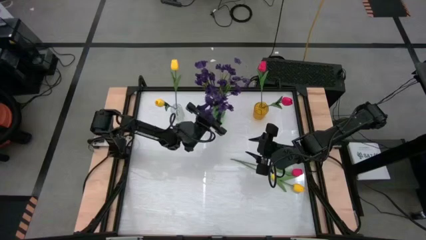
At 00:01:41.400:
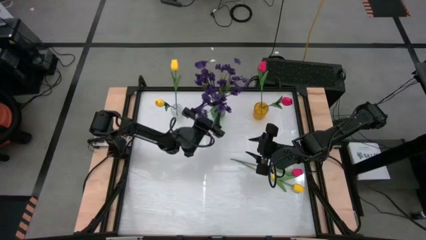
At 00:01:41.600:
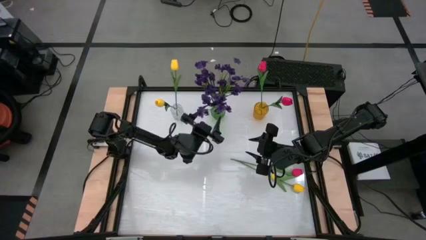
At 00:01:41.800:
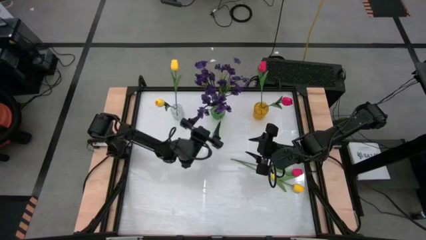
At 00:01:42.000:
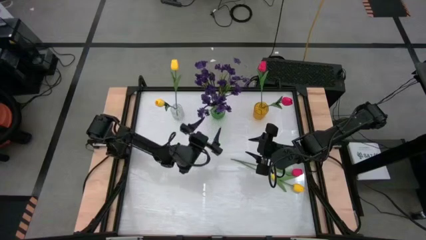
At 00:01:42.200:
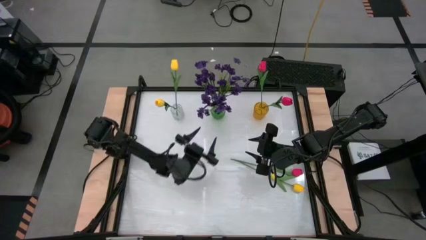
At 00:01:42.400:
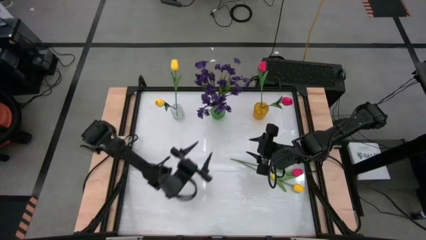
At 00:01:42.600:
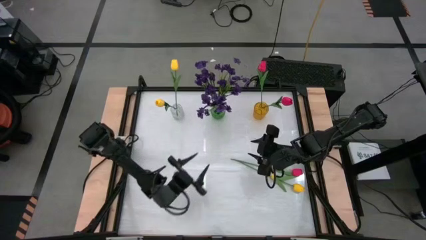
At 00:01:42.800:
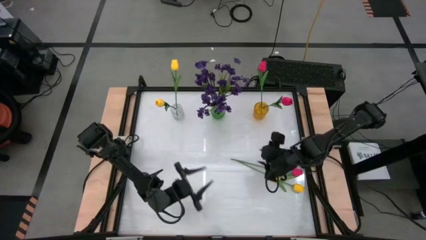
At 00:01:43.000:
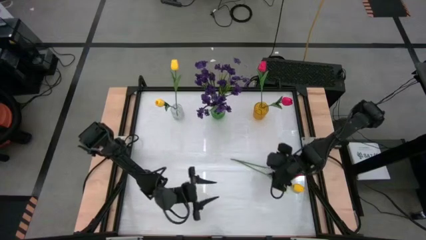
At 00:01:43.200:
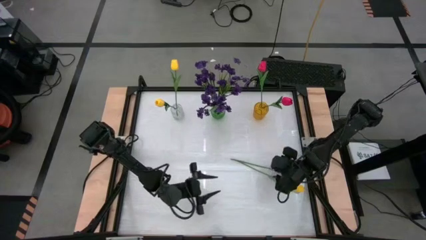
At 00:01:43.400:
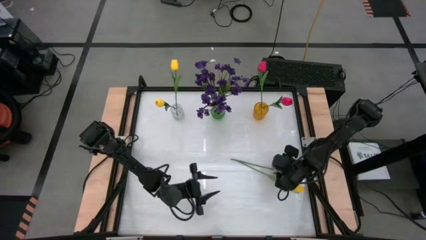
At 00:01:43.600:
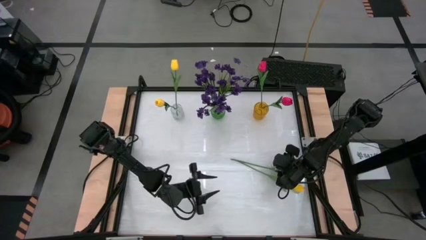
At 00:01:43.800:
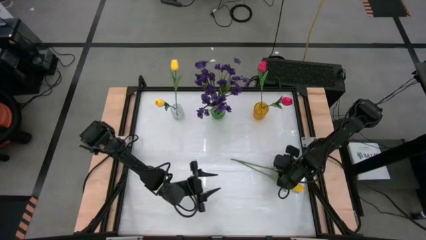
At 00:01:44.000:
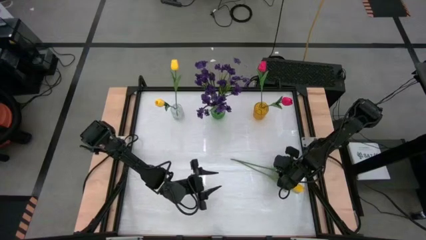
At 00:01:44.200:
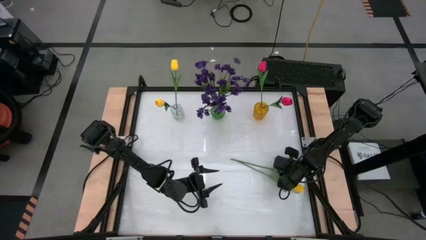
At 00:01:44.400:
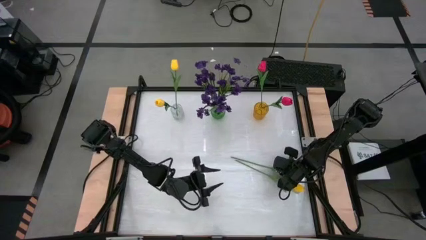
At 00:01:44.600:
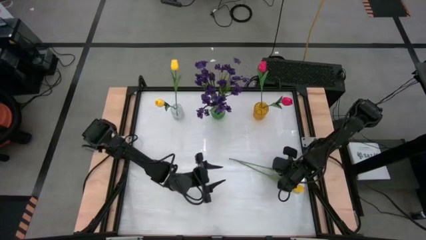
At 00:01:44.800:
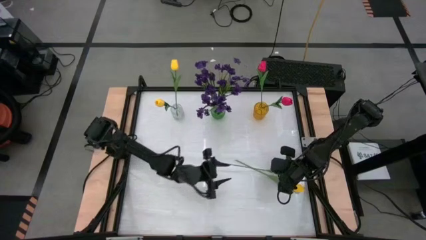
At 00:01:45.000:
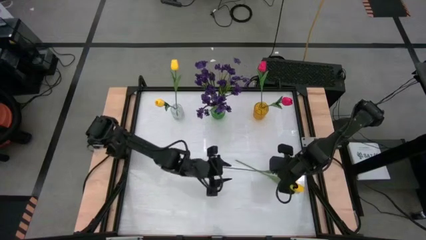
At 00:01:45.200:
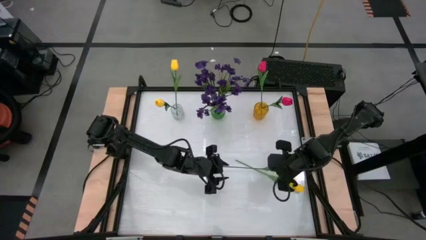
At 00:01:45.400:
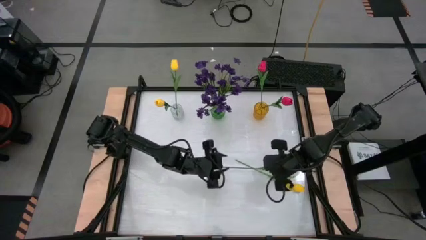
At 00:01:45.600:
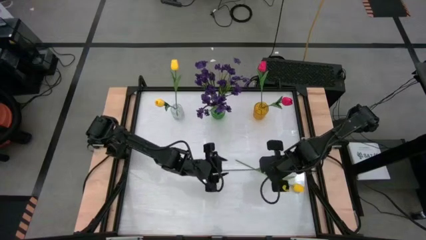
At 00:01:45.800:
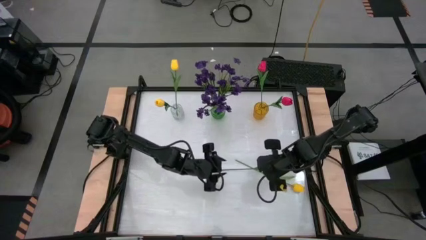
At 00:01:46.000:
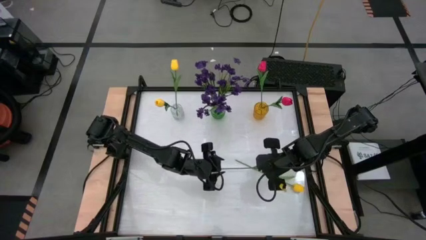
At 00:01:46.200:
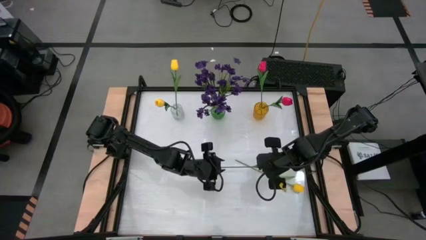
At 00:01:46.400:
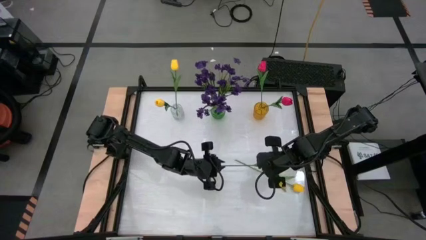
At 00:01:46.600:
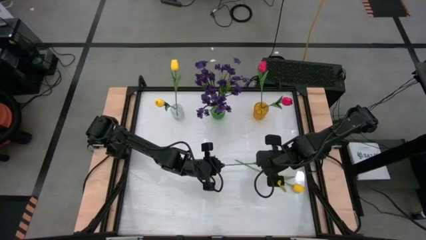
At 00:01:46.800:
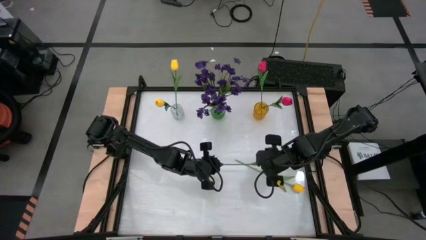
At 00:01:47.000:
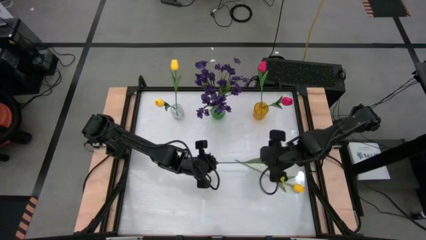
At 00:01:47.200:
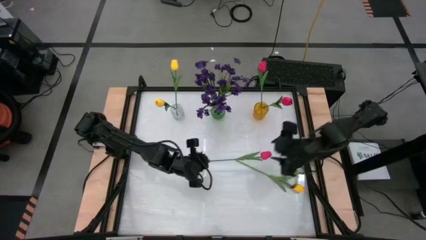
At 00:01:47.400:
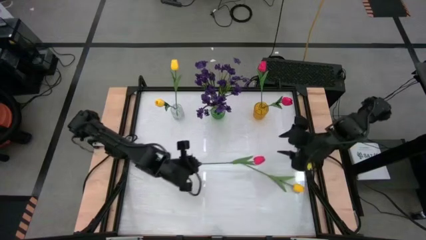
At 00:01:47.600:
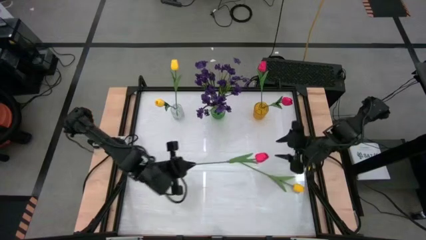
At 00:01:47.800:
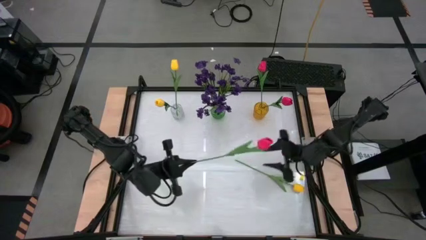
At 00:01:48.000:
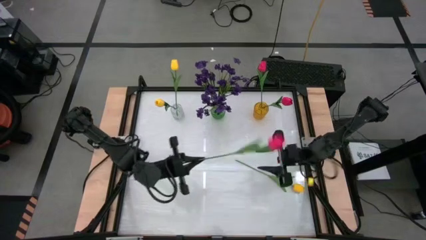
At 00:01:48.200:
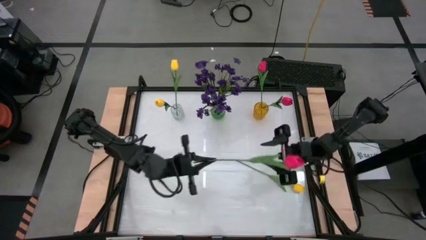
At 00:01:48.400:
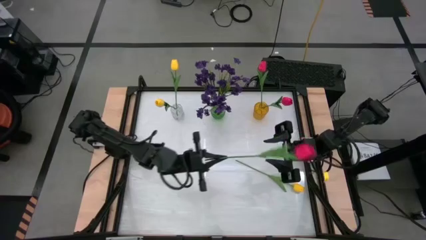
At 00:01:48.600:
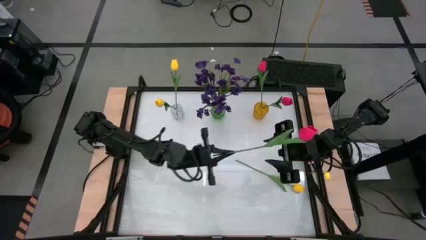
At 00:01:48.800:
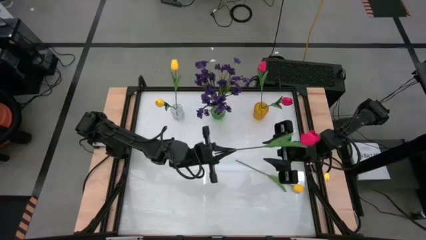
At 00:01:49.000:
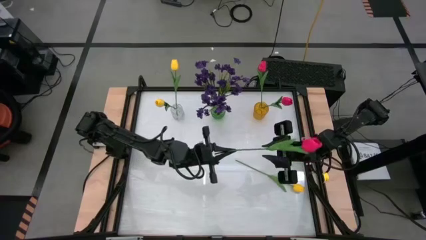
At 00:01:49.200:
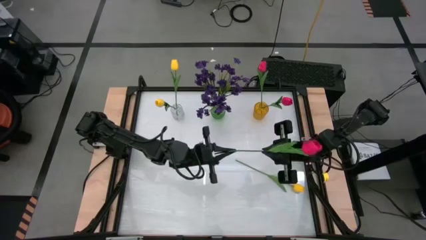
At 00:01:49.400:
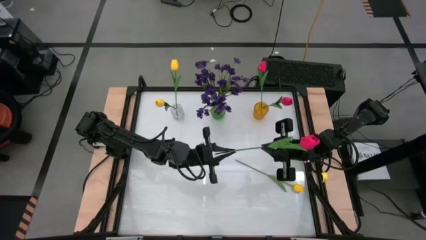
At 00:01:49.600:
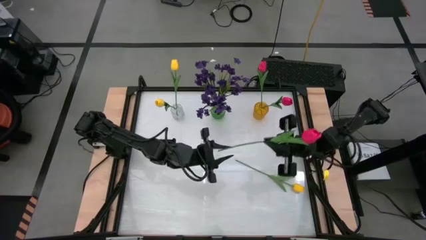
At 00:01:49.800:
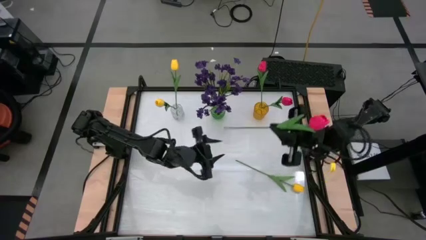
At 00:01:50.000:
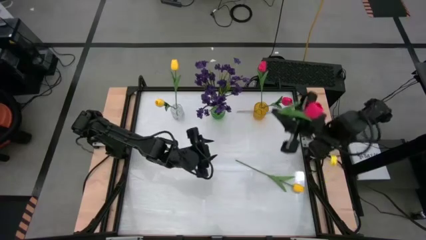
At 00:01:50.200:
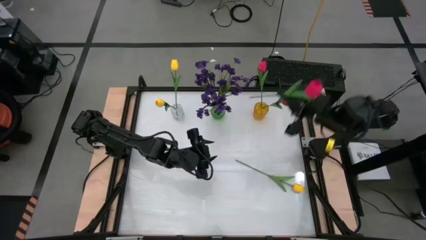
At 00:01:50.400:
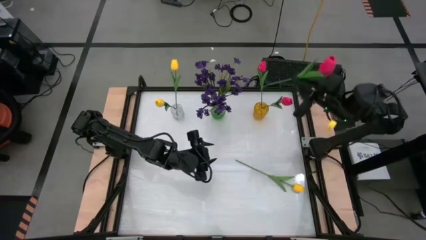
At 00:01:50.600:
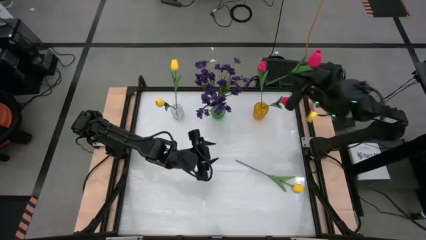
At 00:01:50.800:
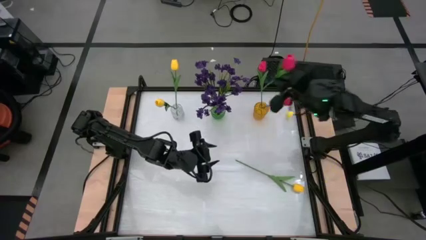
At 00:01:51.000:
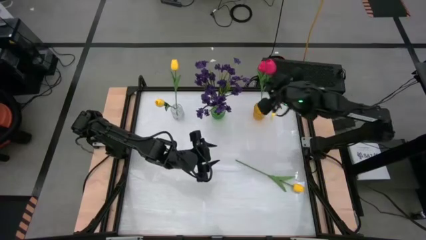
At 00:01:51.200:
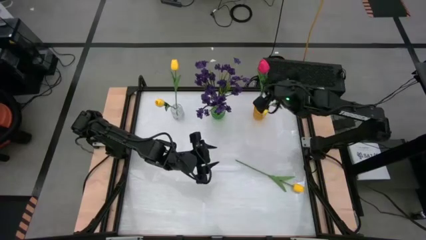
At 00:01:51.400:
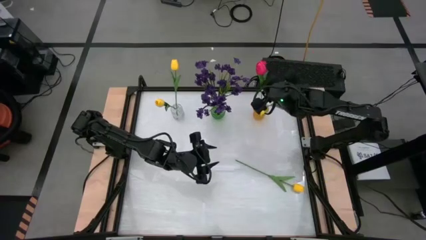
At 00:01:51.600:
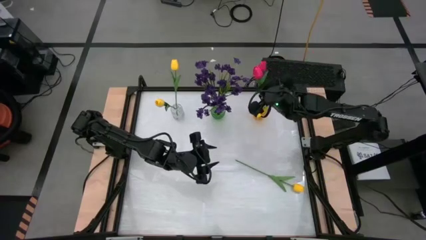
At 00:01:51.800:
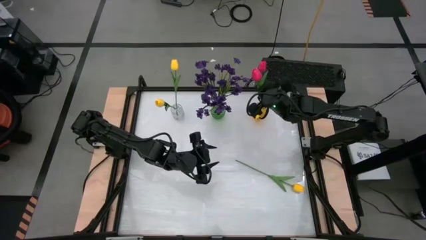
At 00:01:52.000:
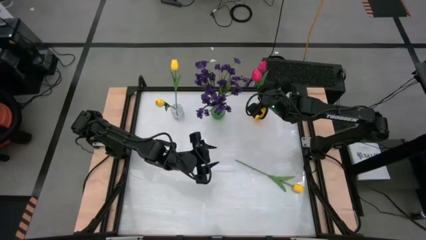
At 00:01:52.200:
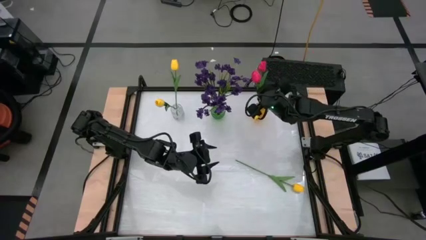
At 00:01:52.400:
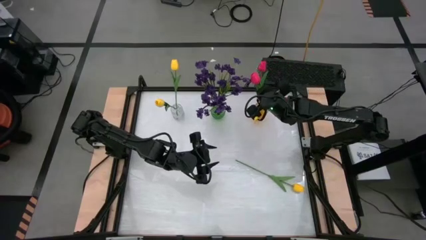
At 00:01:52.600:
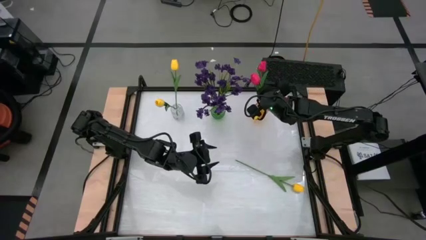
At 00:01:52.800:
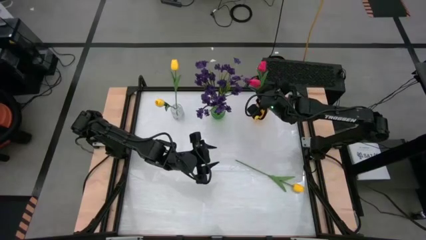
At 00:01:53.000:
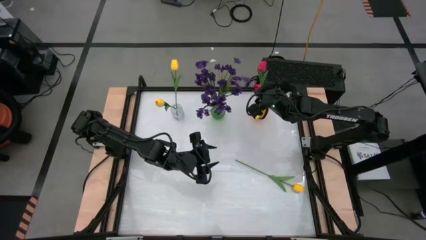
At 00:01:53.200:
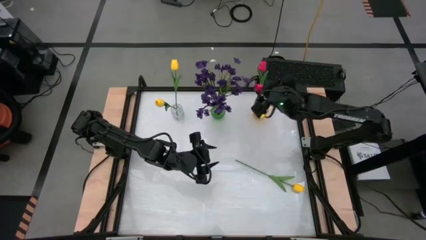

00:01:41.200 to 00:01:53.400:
Task: Sort flowers into vase by color
Put the pink flower into the yellow vase
